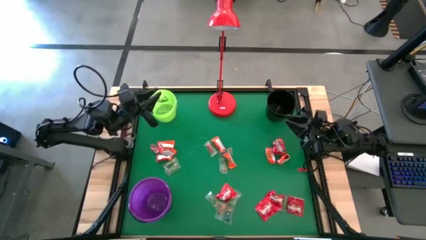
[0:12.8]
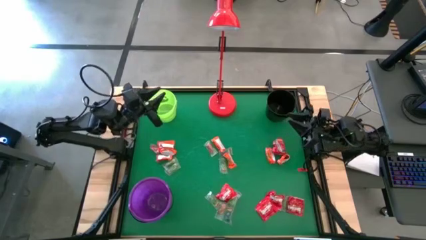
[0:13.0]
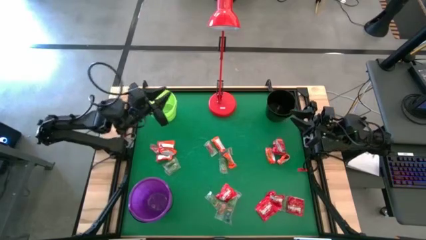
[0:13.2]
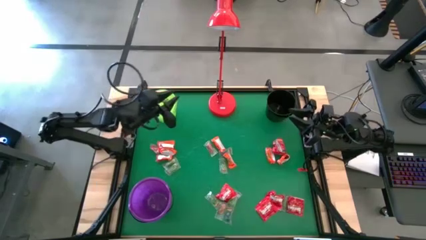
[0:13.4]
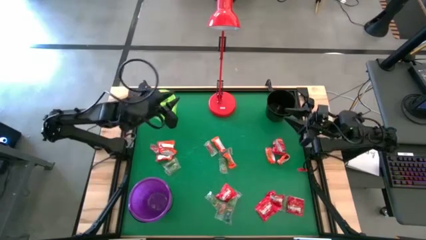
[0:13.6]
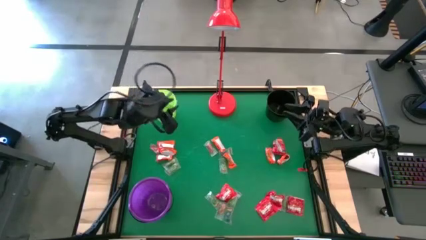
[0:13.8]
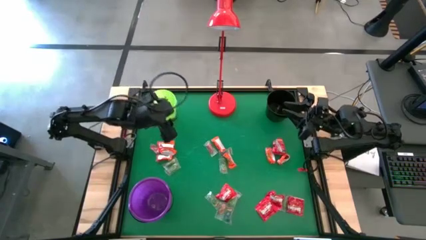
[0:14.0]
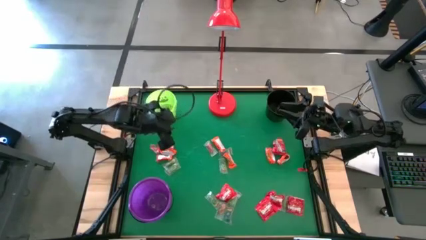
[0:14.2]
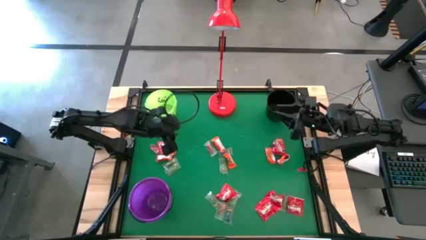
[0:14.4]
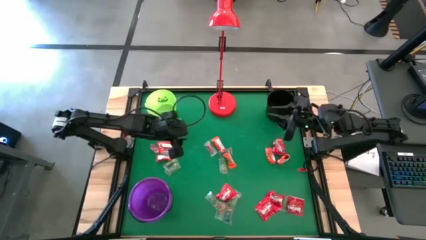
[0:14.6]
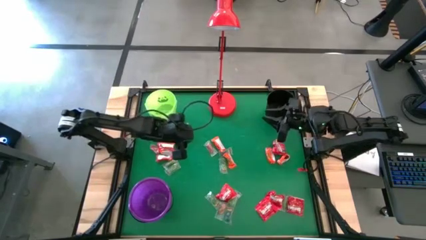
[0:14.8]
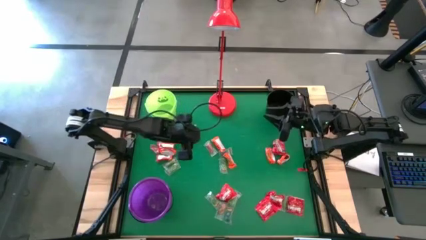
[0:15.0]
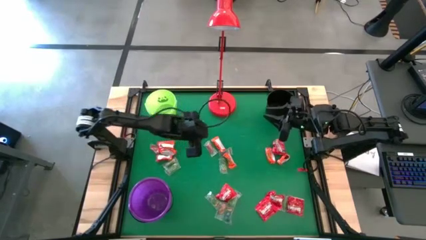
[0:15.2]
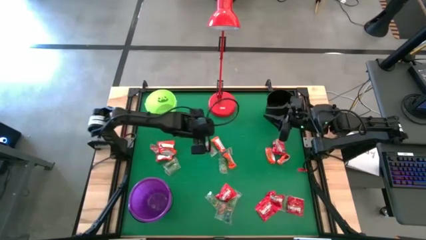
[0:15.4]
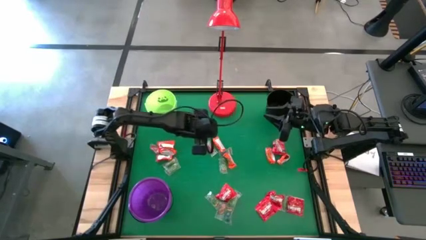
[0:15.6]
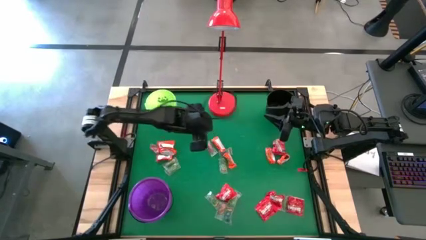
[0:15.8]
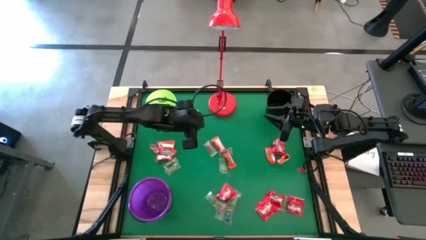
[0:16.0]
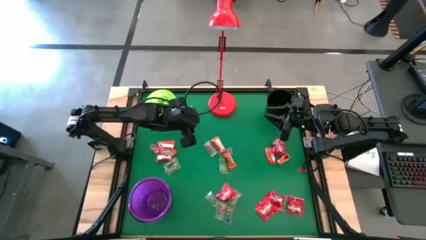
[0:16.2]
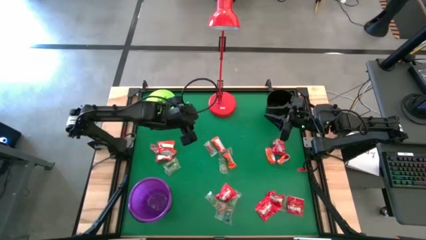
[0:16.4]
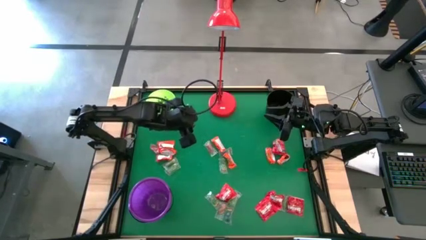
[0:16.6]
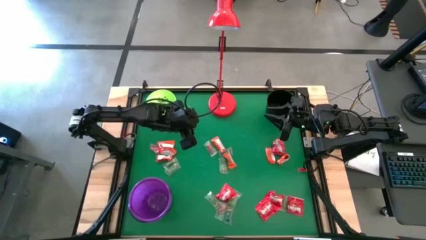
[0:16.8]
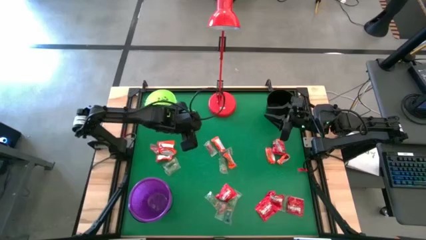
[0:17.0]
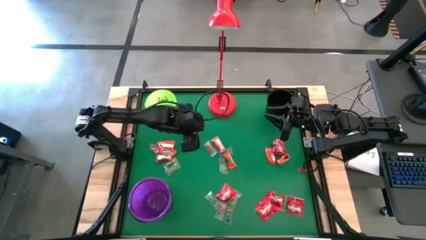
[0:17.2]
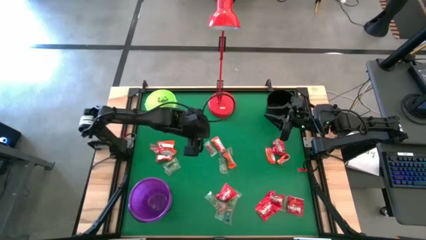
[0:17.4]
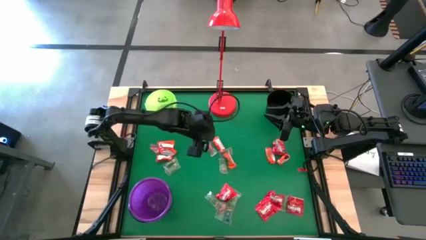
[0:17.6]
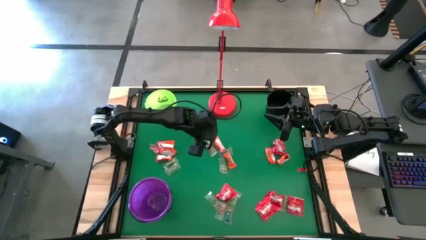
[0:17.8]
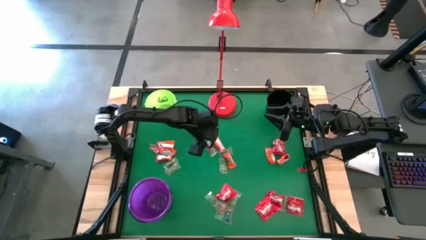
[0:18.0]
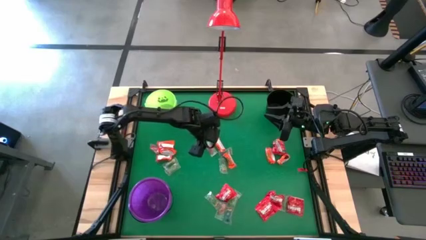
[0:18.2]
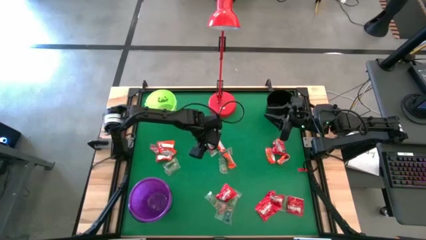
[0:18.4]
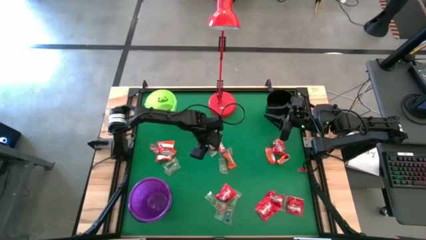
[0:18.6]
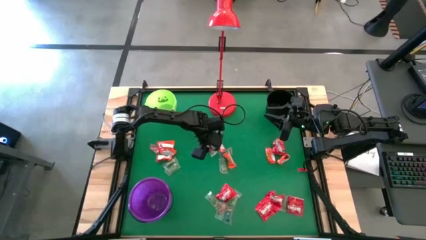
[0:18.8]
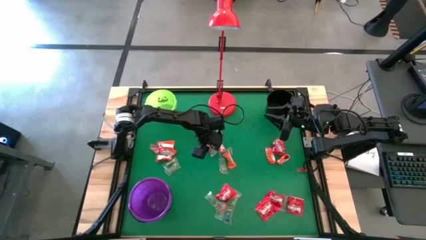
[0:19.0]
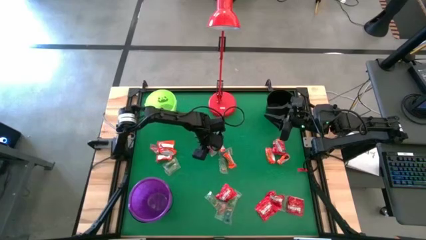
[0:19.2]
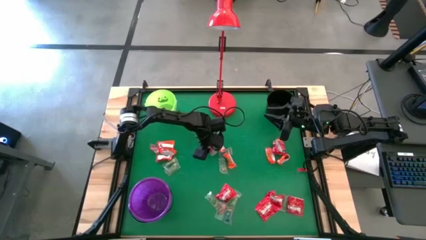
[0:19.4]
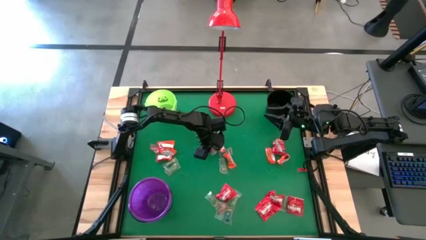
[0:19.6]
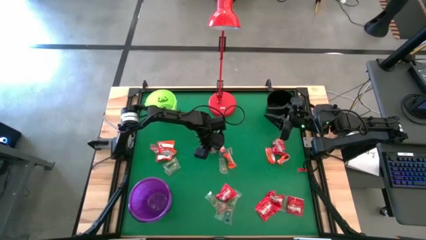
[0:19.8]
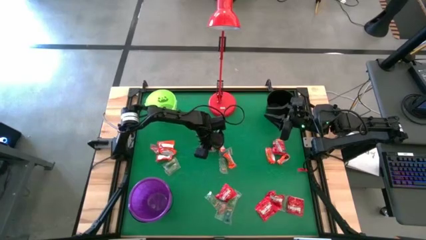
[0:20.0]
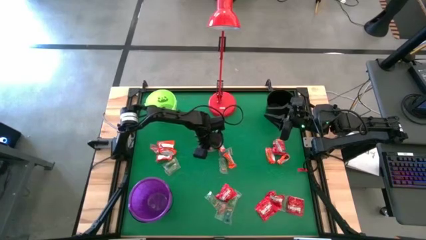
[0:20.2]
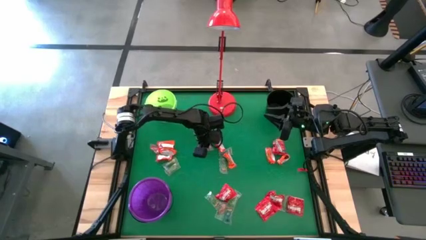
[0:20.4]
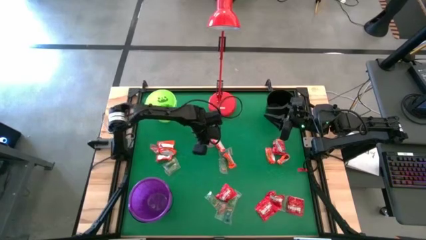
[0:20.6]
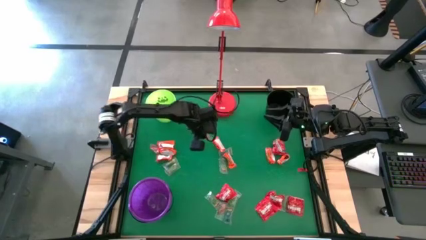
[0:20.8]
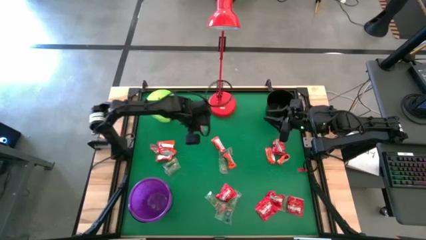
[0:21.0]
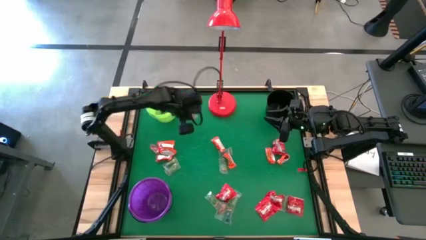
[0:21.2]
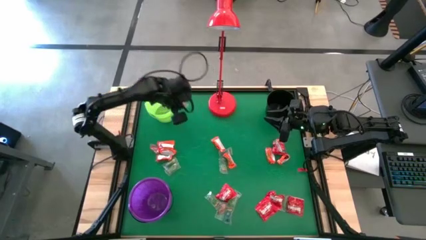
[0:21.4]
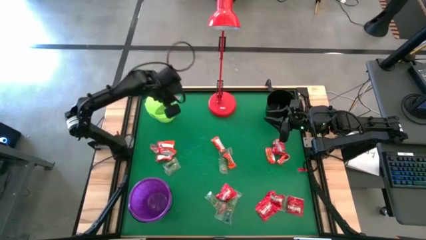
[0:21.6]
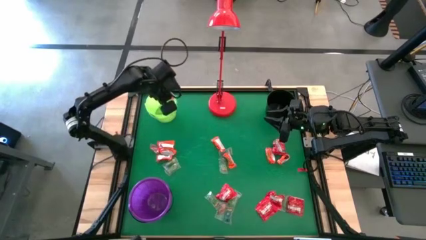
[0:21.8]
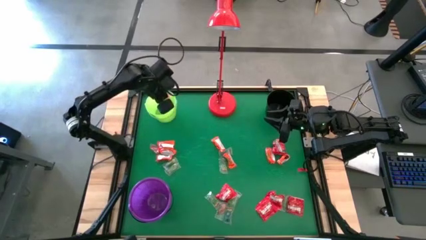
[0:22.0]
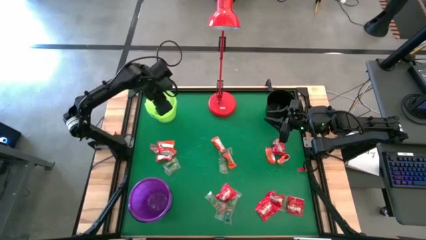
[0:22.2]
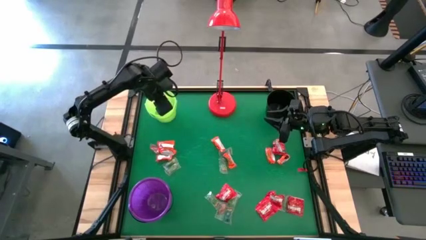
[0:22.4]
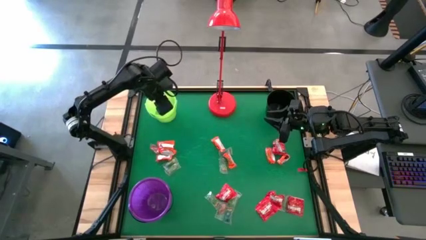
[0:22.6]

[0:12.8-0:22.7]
Task: Sort candy
Put the transparent candy into the green bucket

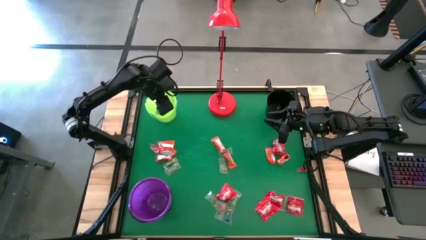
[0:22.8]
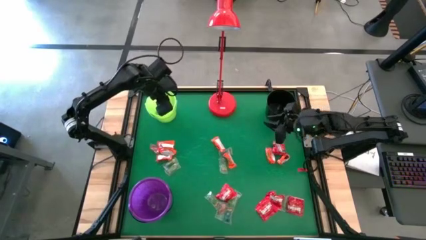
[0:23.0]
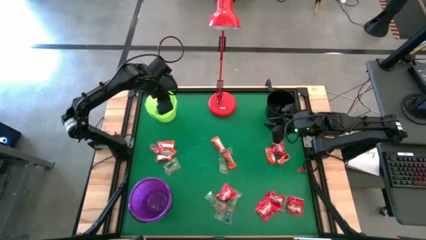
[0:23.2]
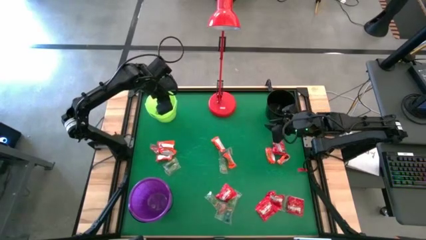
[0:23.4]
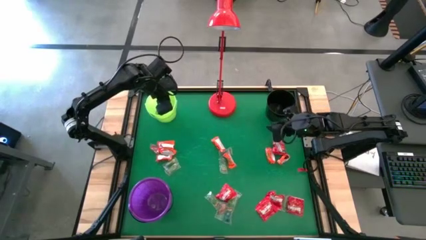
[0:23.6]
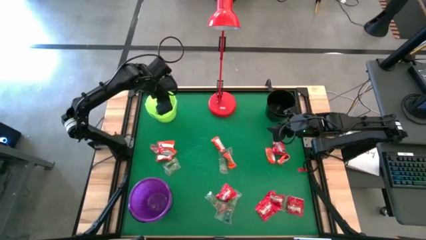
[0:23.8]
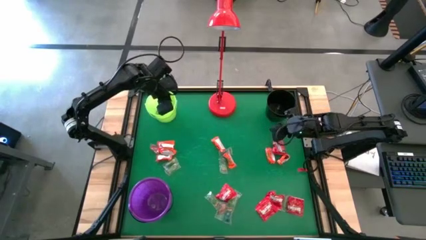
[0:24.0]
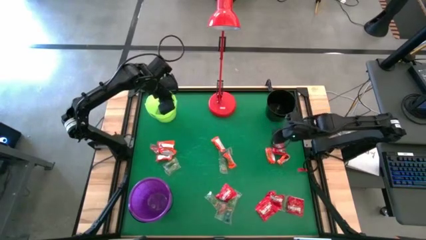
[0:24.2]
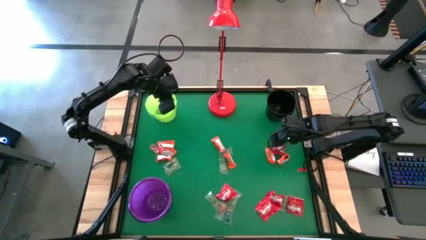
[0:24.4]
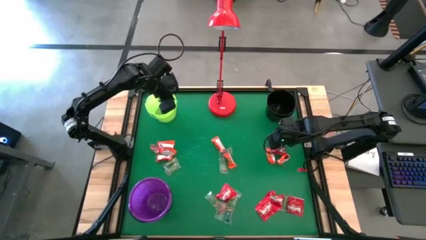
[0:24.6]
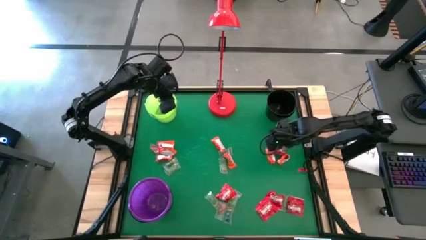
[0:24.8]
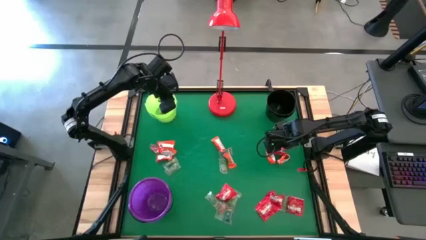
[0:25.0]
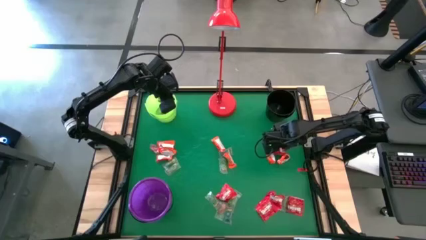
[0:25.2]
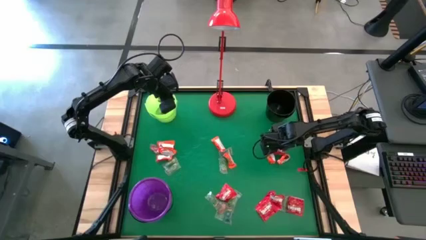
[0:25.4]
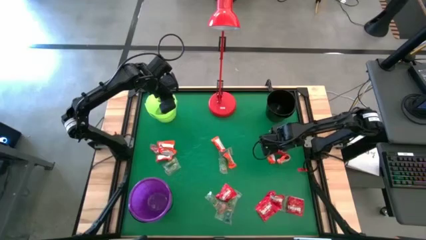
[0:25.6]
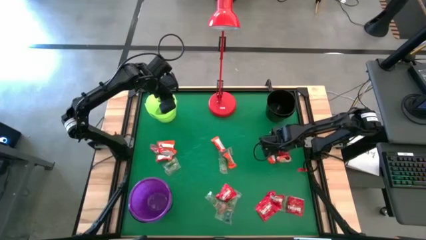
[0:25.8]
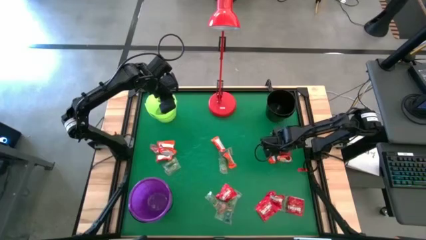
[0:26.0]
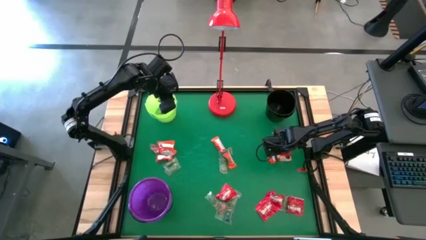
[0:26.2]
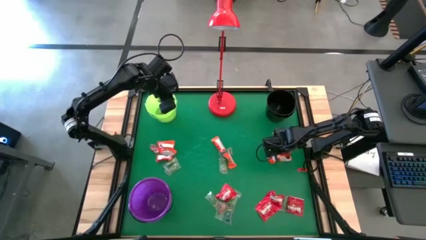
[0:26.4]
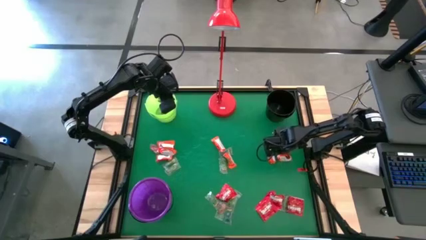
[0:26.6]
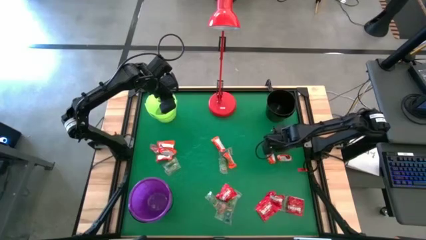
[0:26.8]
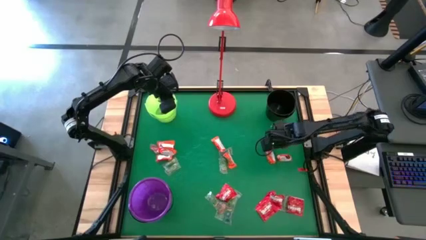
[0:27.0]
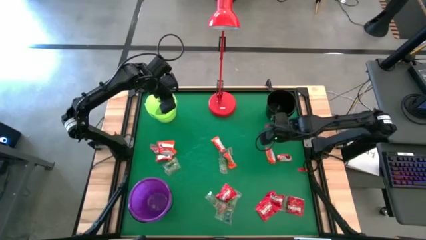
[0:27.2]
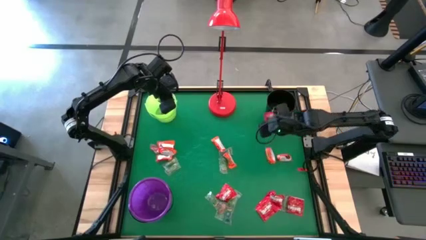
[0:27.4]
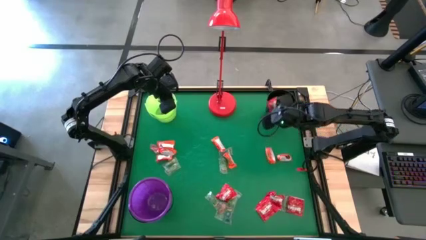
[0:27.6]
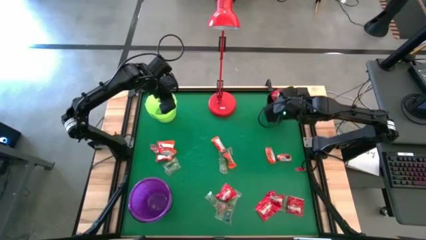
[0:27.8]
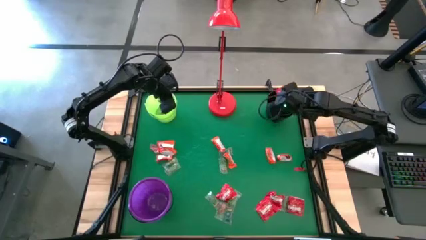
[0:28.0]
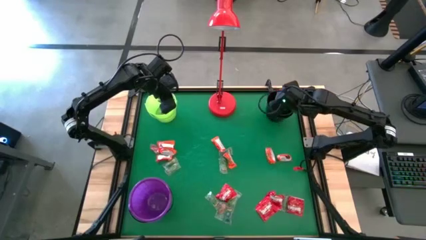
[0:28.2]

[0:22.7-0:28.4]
Put the red candy into the black bucket
